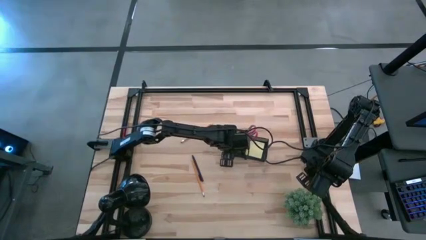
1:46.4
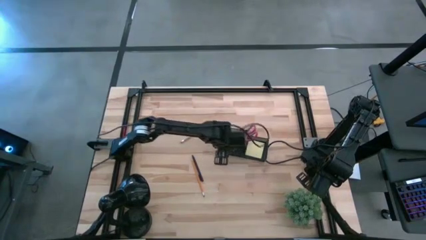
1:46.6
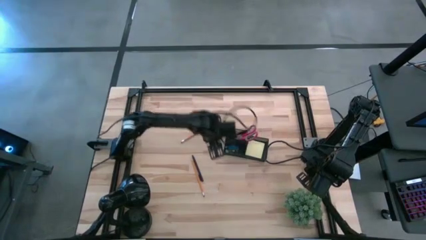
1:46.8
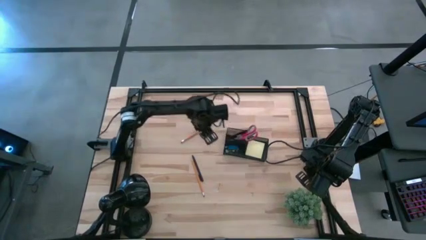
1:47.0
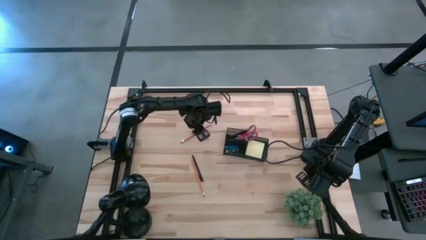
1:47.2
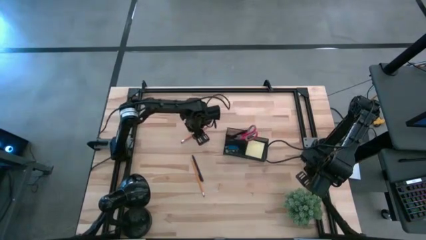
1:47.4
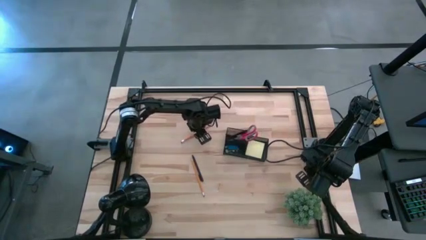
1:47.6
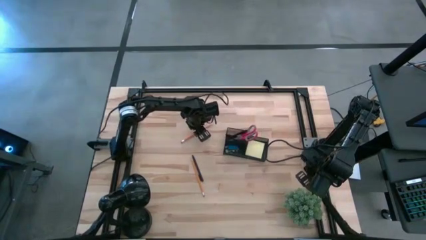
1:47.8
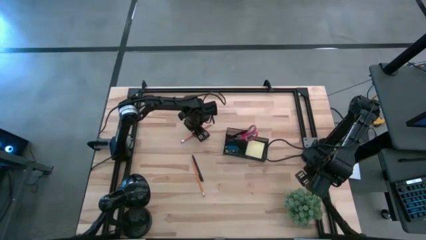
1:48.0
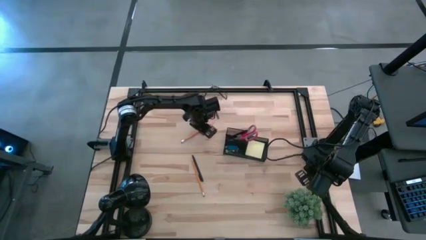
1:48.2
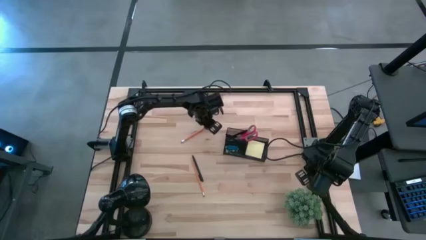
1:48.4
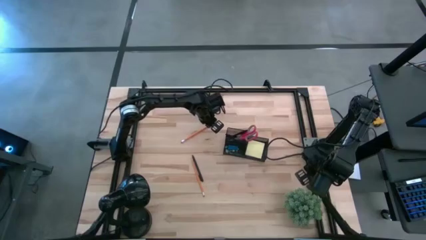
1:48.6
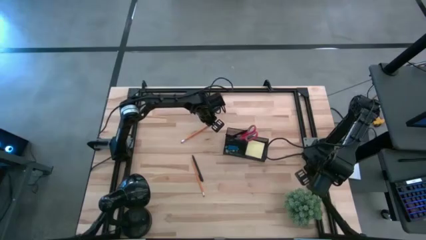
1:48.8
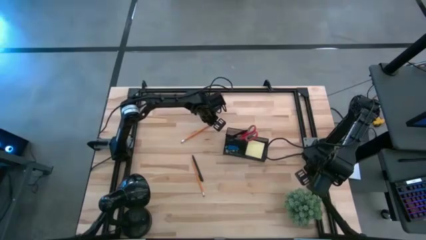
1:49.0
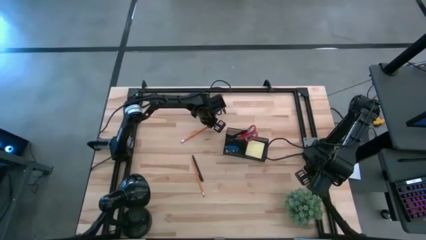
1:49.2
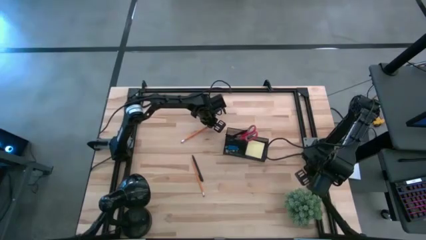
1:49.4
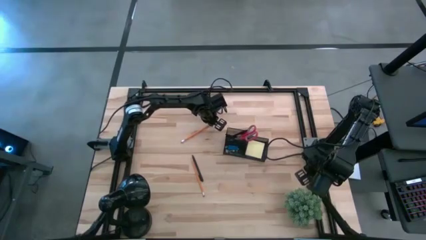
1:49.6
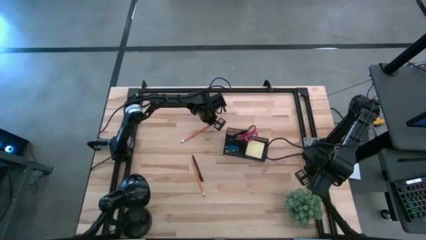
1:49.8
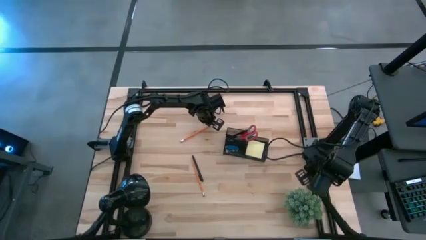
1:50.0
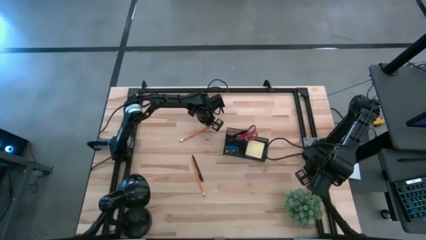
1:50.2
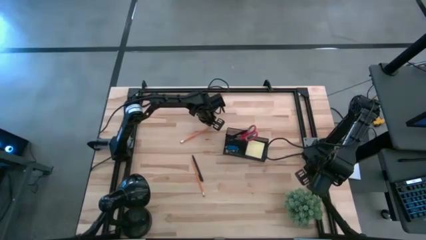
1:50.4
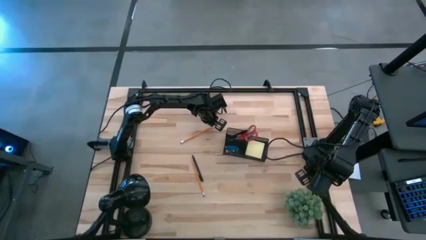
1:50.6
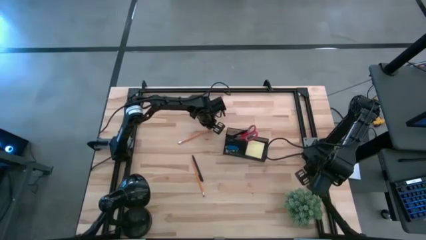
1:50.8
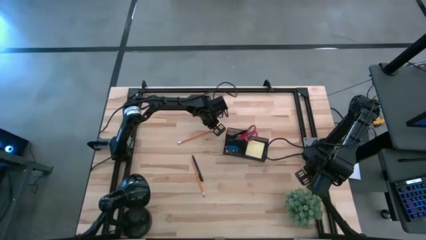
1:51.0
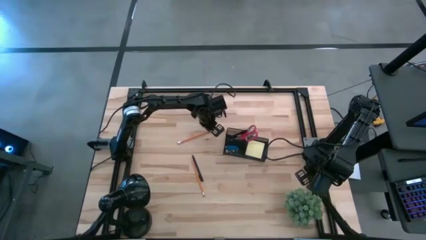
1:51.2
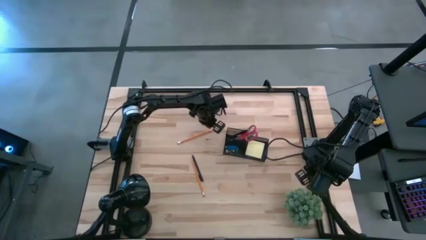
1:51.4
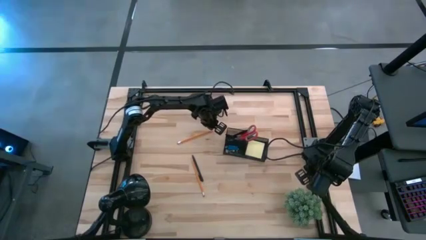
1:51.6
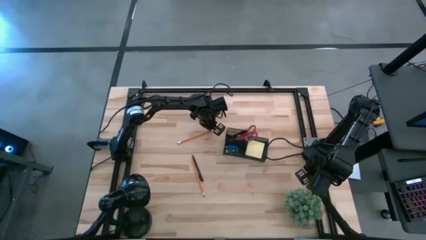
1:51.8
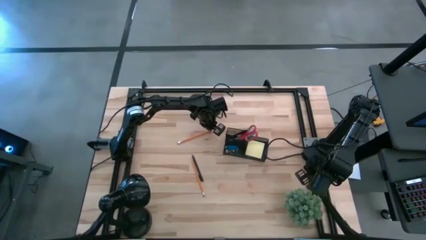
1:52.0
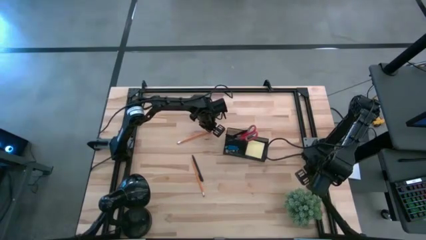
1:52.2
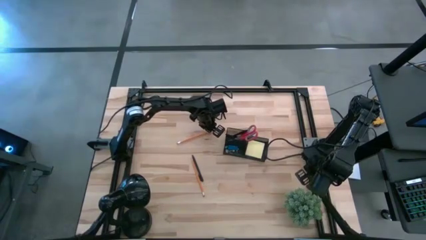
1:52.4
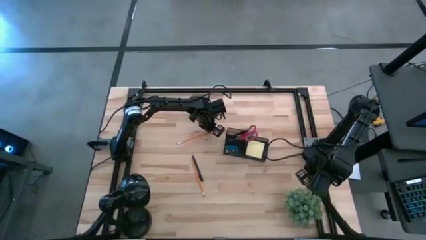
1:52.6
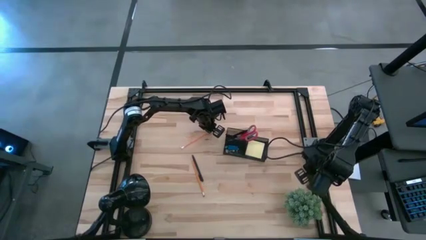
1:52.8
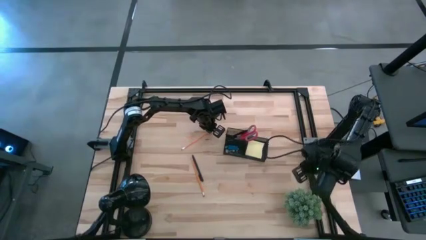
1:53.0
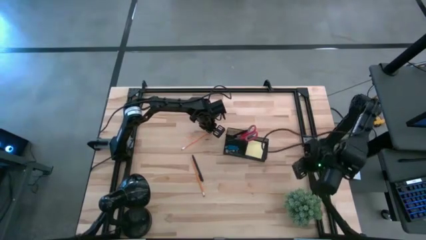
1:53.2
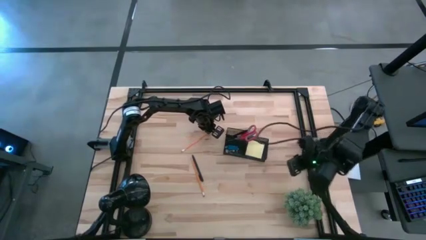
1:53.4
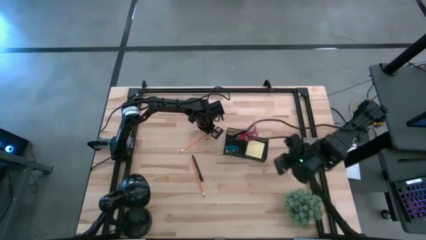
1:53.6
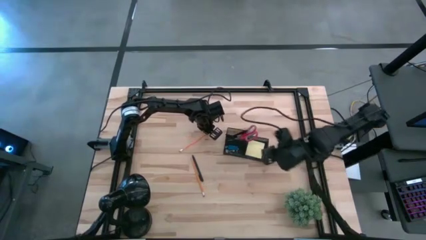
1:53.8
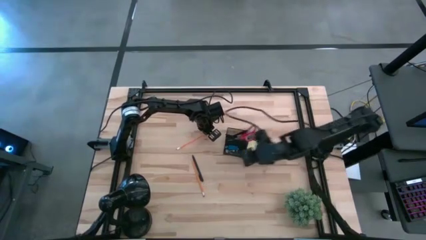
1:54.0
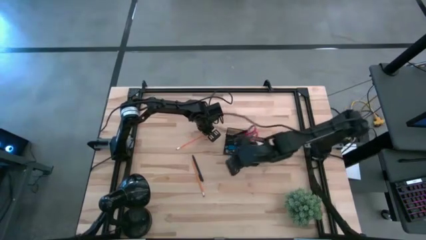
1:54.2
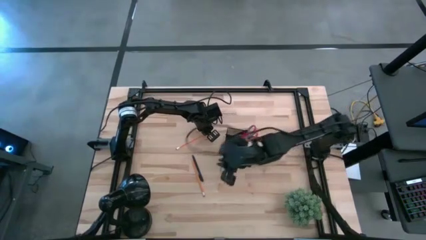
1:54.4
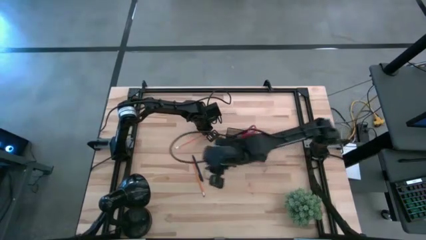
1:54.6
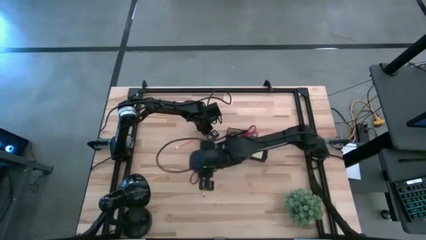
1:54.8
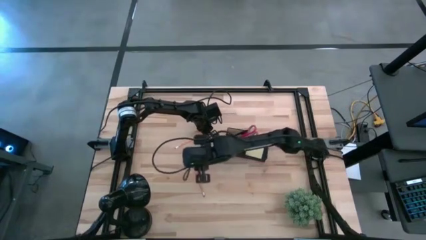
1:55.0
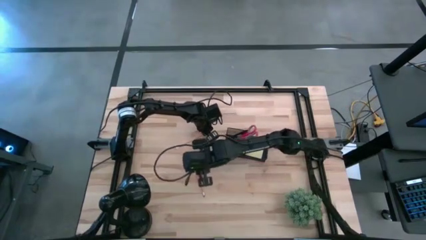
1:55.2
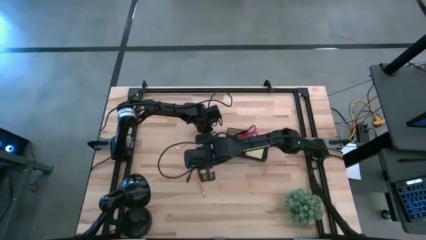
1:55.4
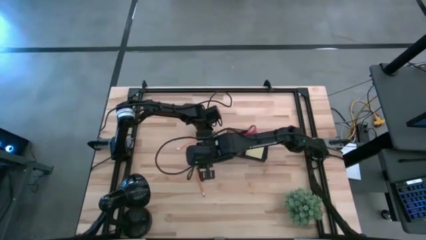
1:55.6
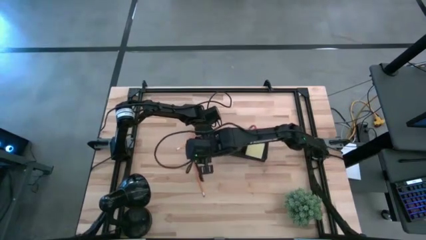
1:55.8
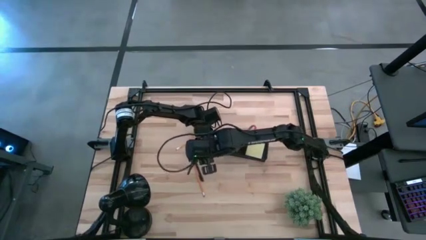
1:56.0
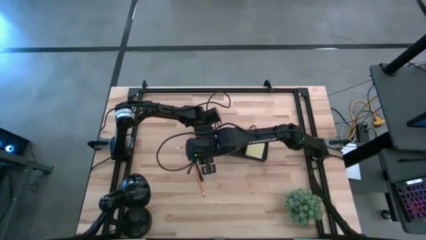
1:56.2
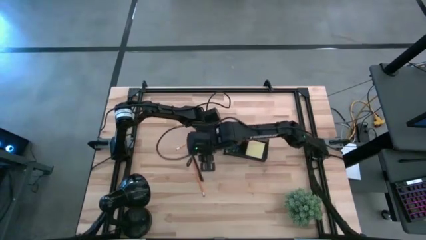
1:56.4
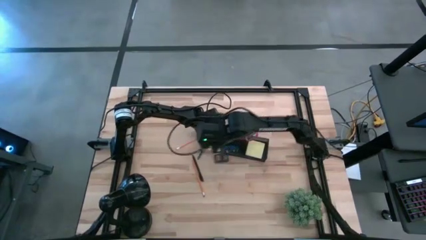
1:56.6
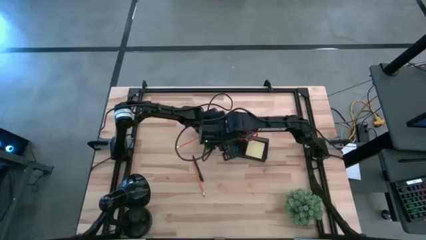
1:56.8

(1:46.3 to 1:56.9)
Task: Pick and place office supplies into organizer
Put the top pencil into the desk organizer
